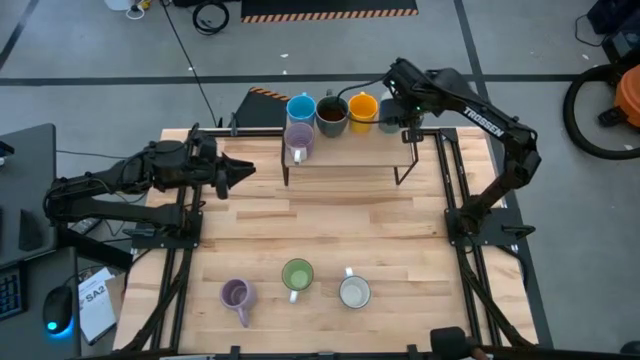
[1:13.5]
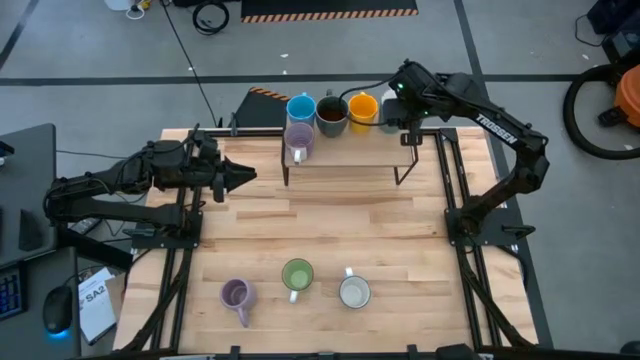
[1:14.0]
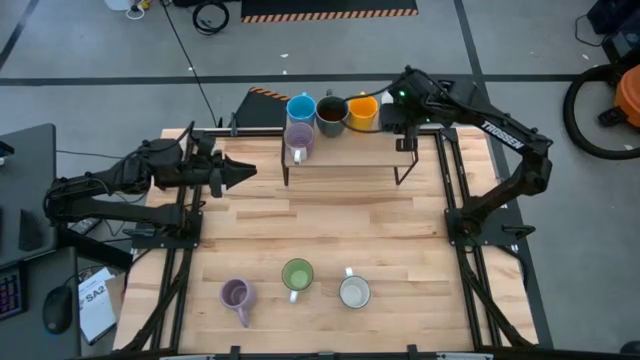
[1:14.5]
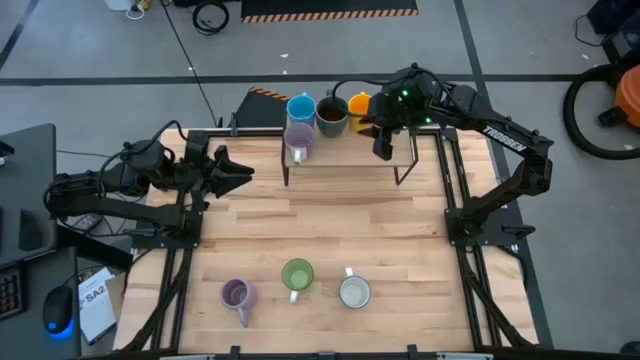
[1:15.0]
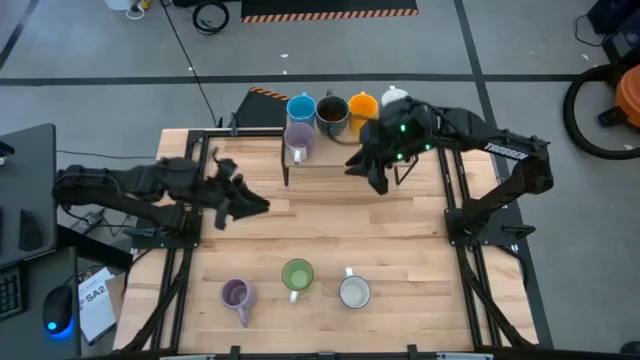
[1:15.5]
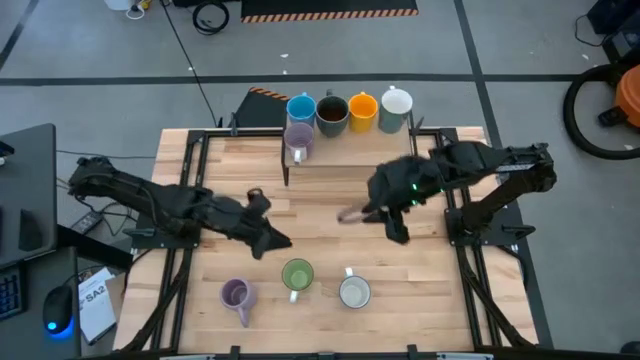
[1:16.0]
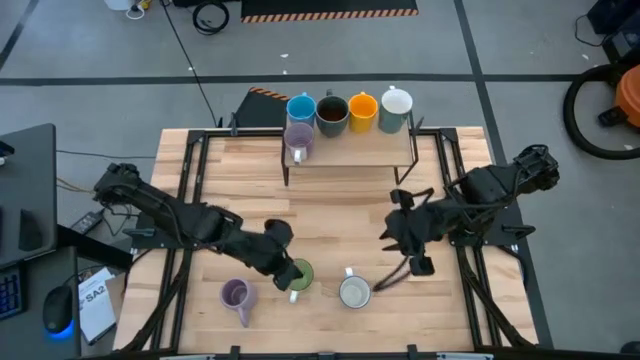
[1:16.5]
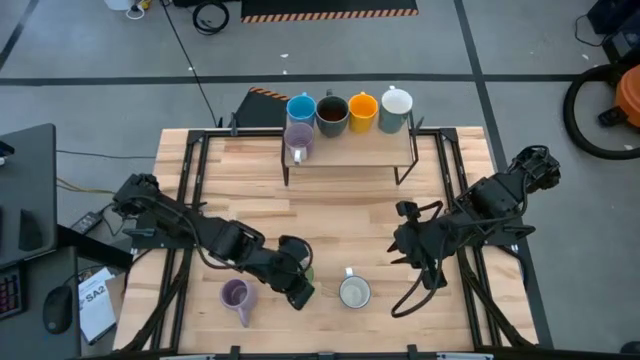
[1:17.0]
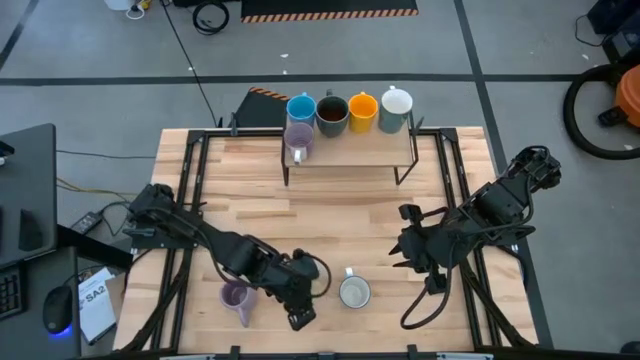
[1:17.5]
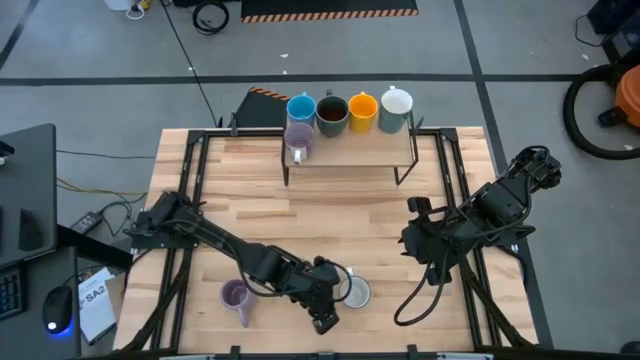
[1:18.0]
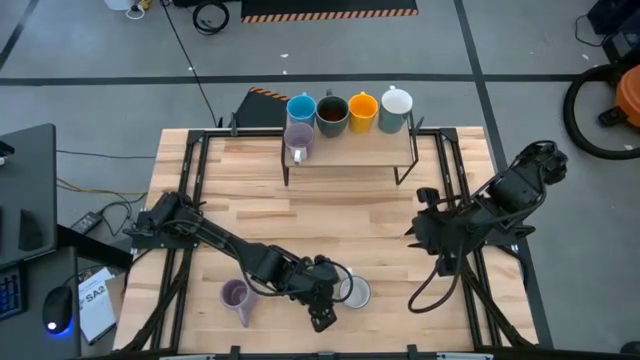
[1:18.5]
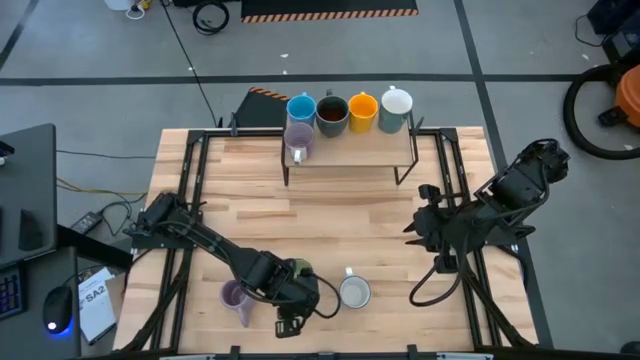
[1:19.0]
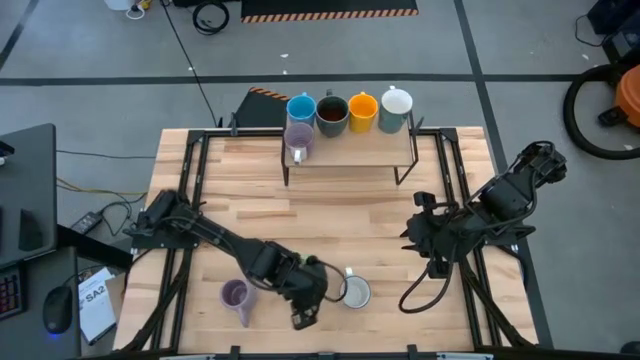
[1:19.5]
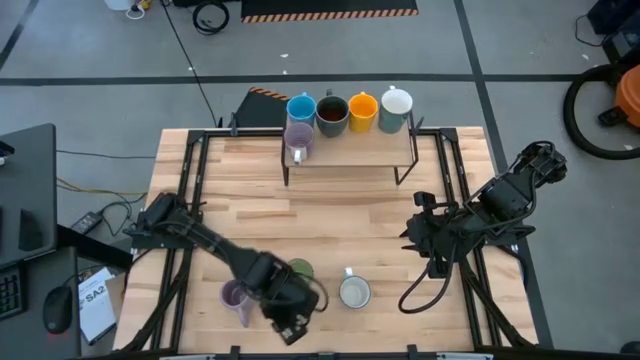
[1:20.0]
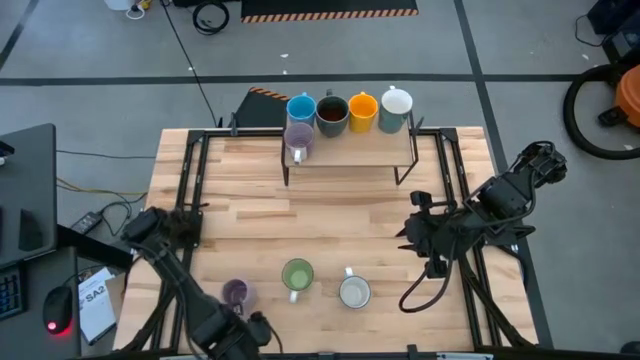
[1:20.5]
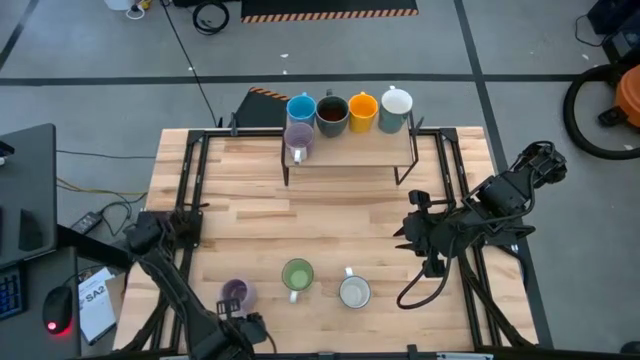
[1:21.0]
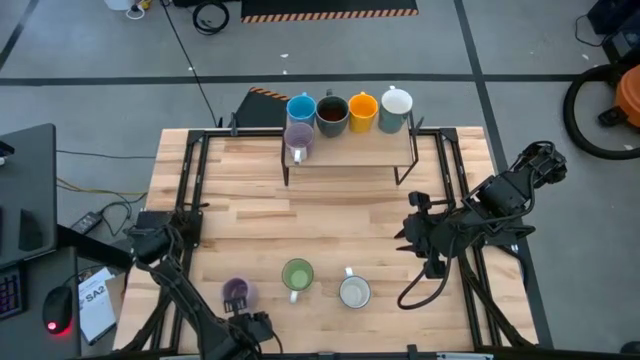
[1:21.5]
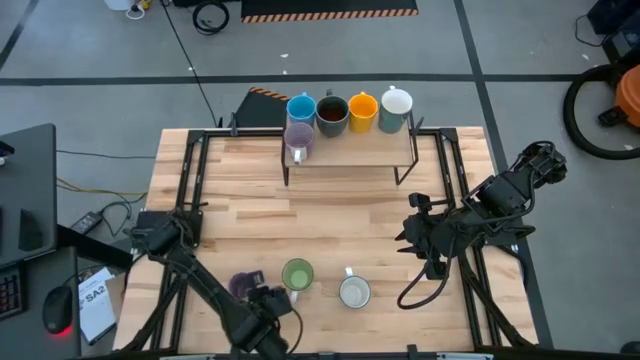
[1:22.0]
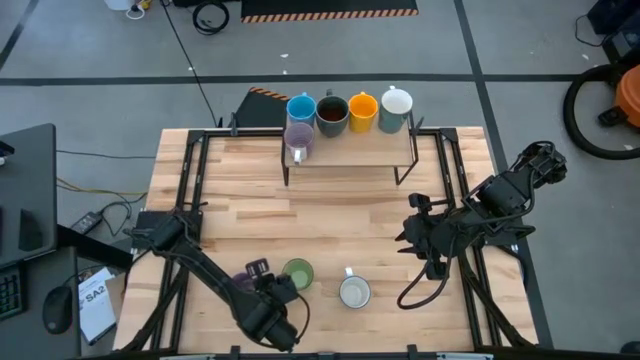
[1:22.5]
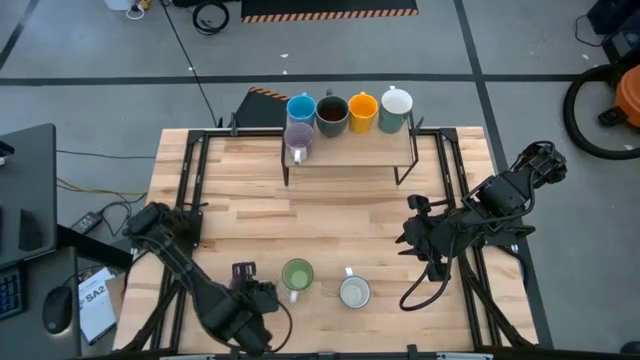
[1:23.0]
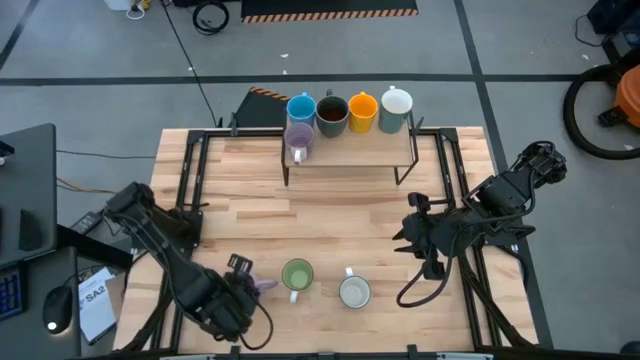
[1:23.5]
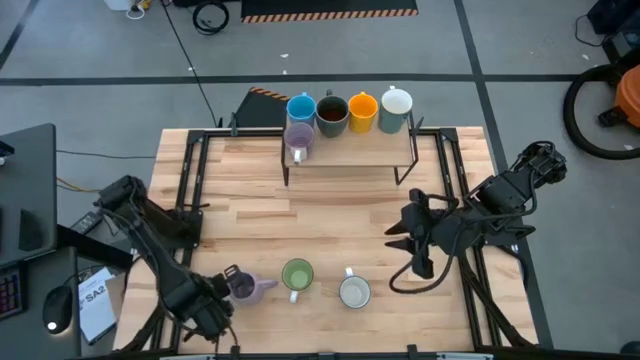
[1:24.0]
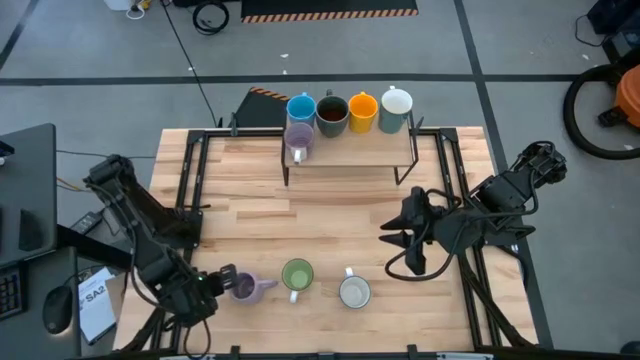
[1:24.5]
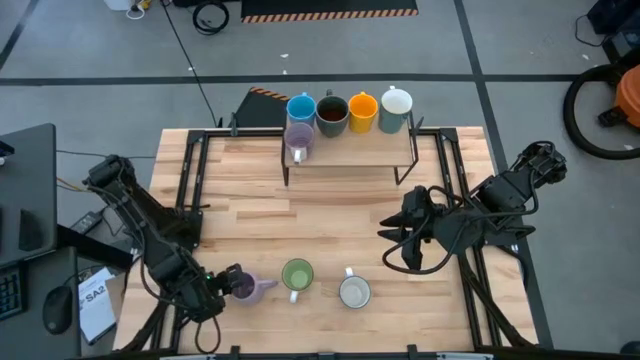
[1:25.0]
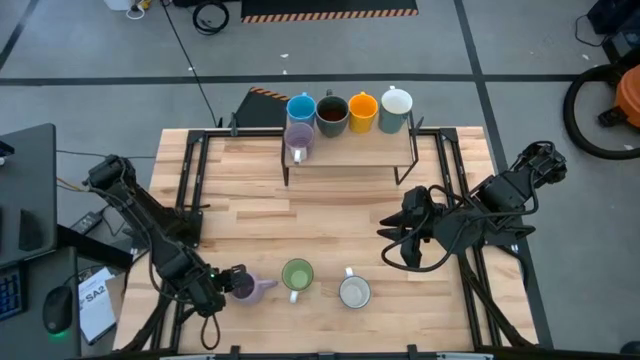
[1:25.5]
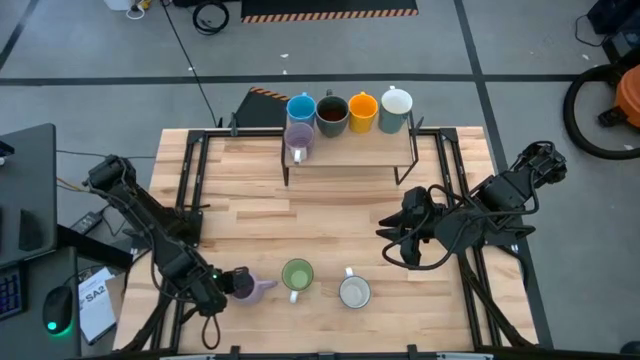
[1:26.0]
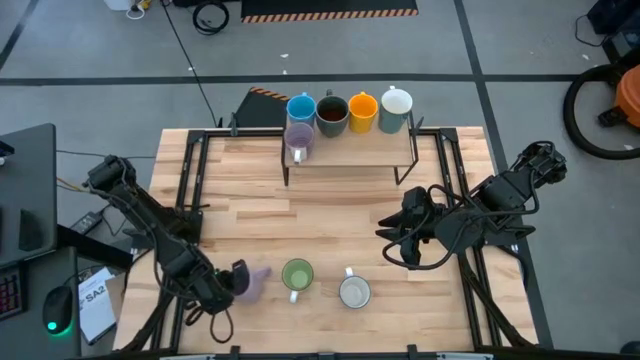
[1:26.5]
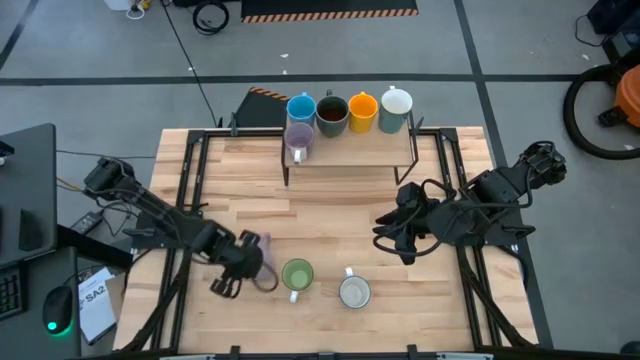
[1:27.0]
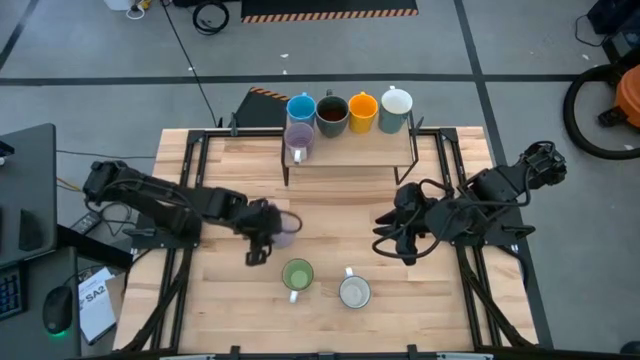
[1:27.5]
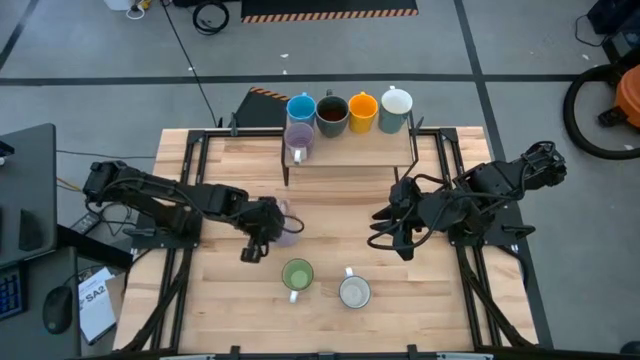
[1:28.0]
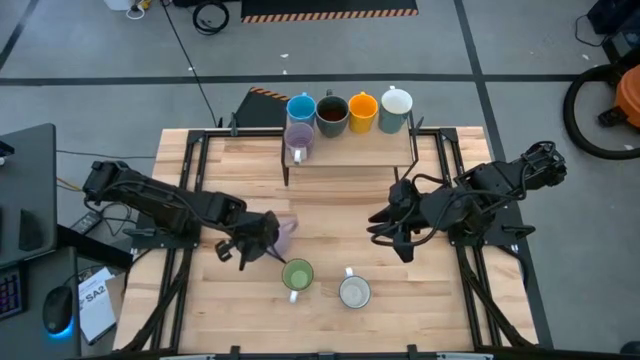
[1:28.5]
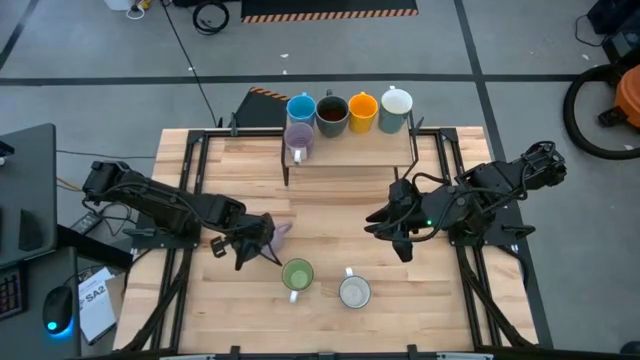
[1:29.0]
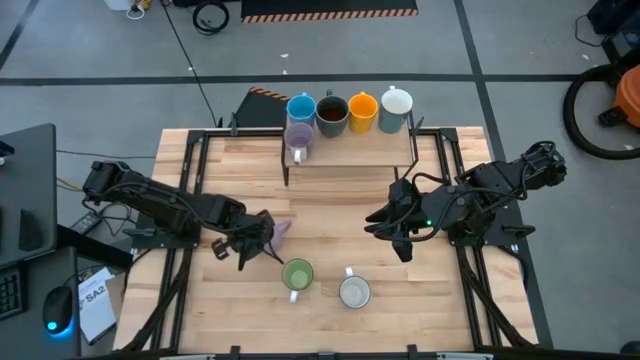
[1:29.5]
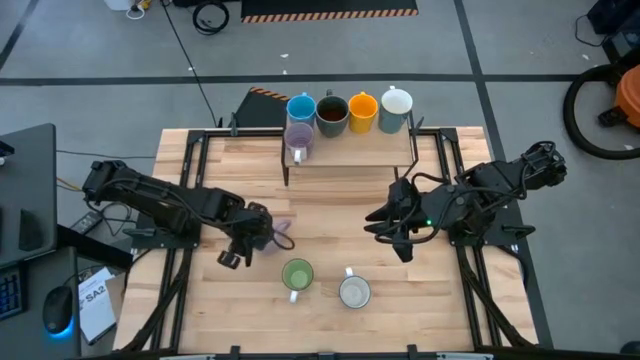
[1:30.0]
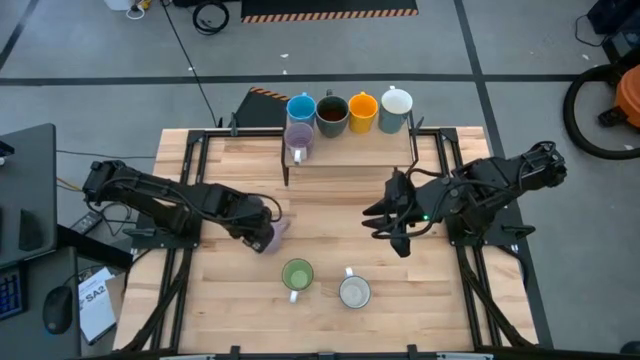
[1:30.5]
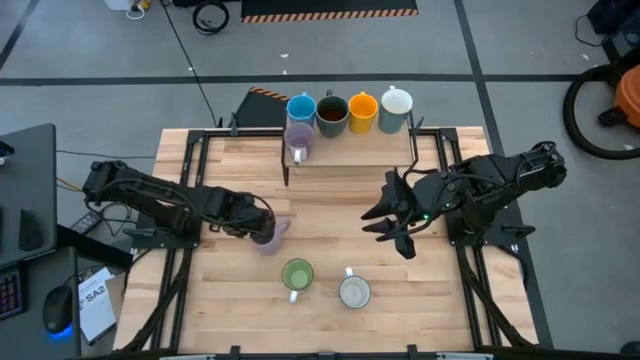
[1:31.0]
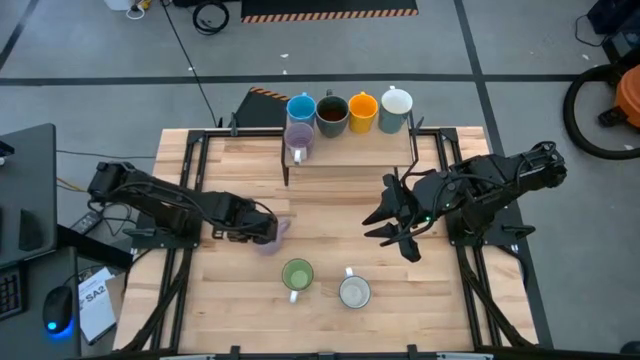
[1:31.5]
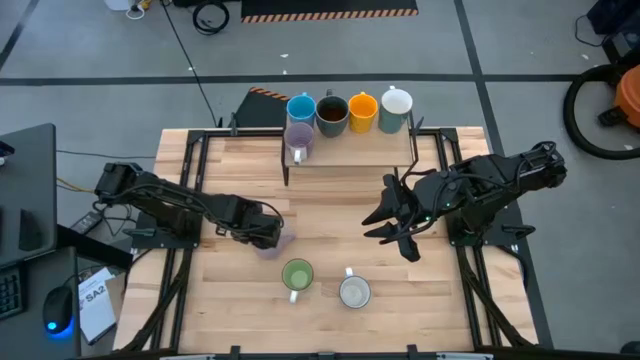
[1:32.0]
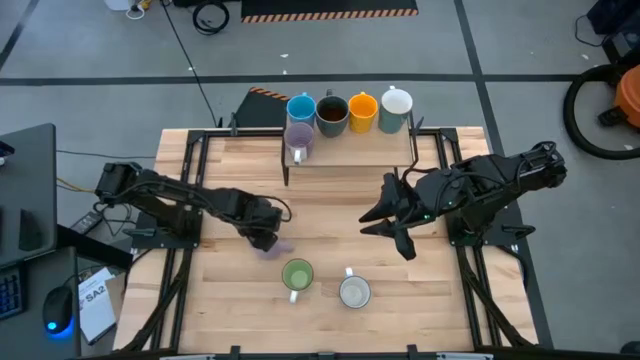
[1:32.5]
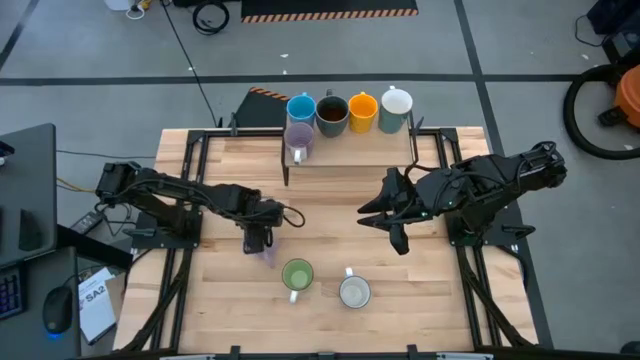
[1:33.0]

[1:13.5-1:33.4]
Task: Place coffee mugs
Put the violet mug on the shelf

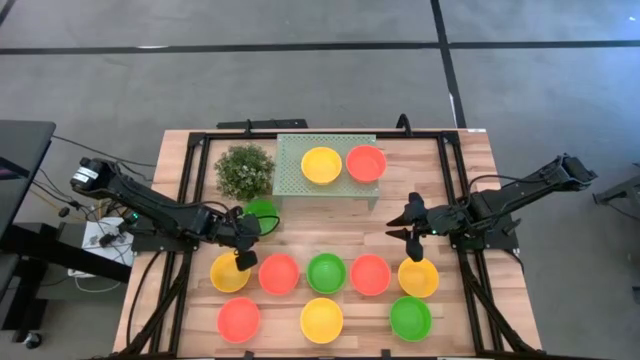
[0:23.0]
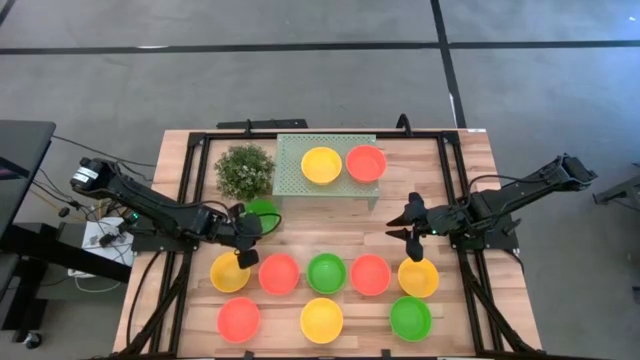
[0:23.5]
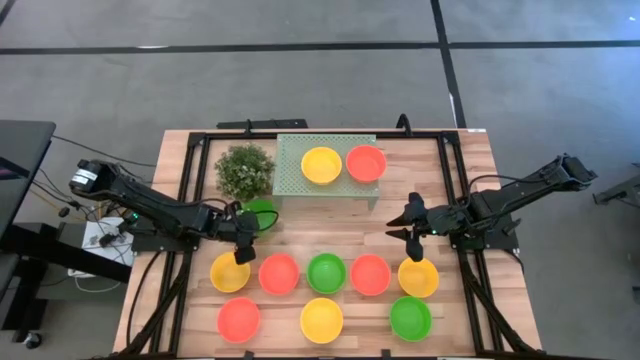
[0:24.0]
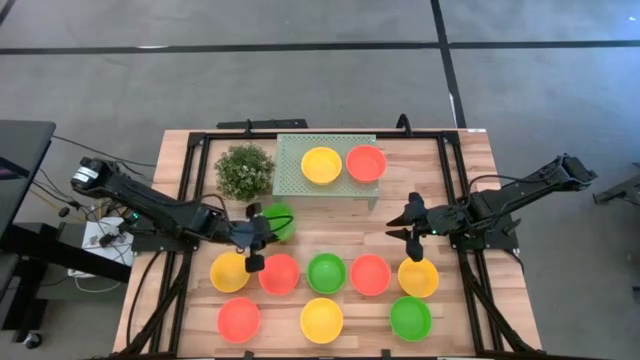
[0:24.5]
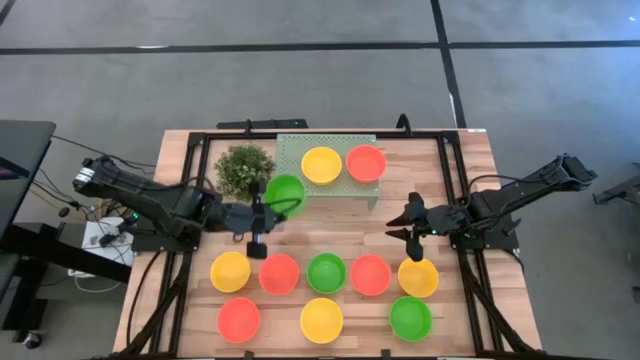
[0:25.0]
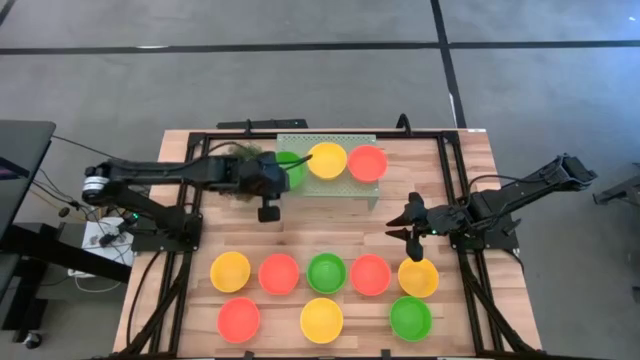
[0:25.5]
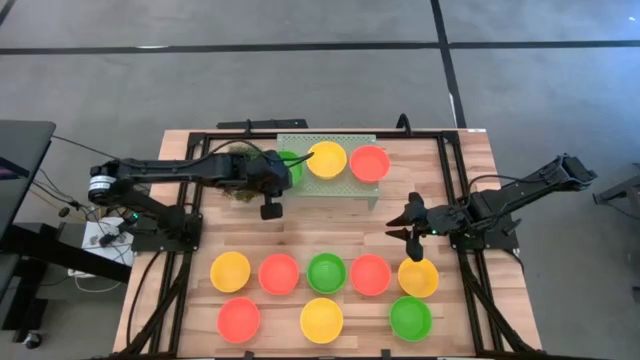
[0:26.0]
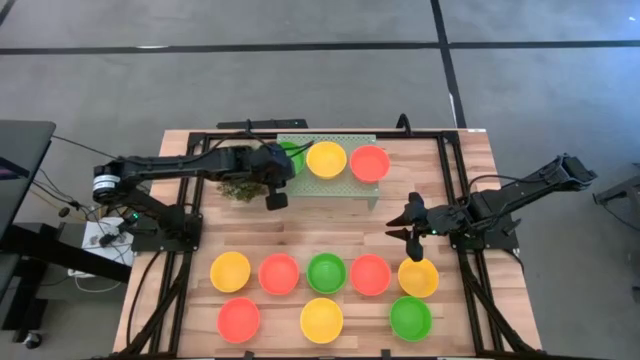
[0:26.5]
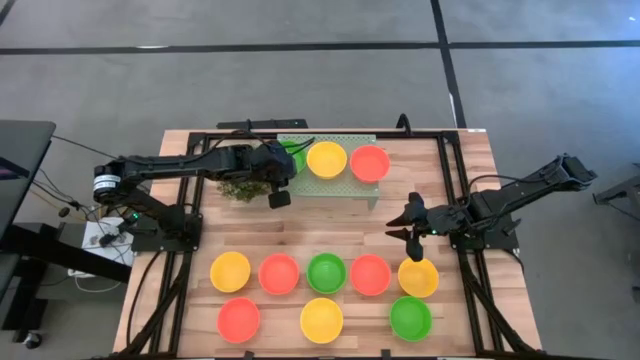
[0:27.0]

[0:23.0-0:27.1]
Task: Pick & Place Mini bowls
Put the green bowl on the shelf
